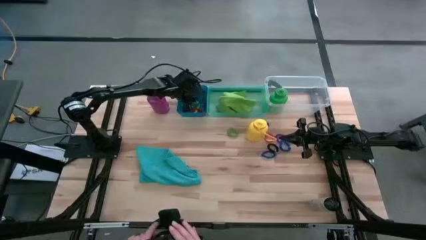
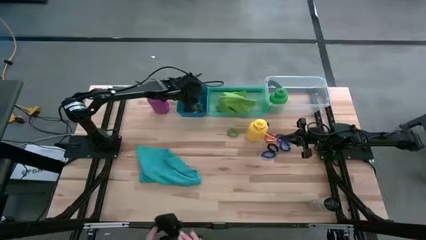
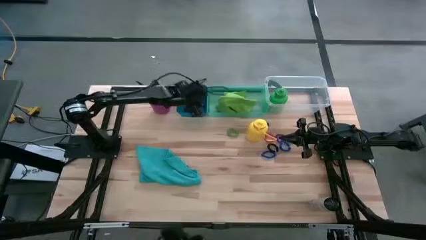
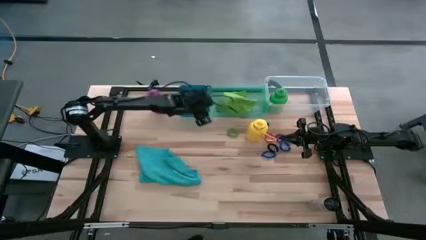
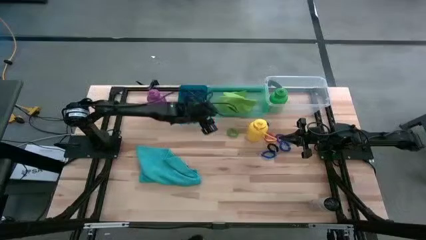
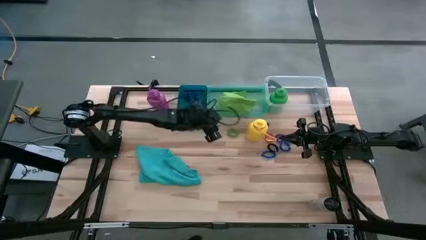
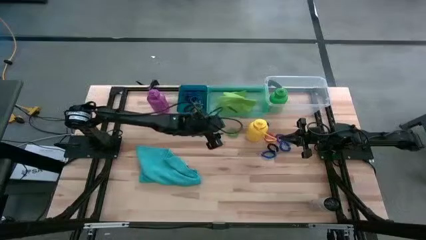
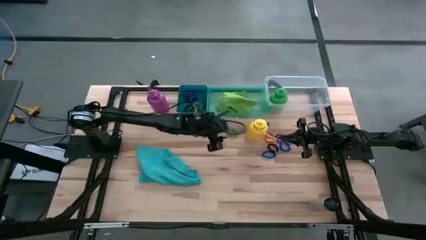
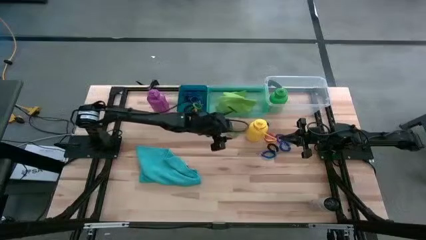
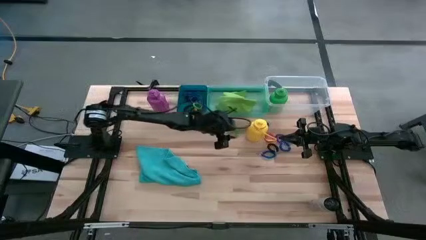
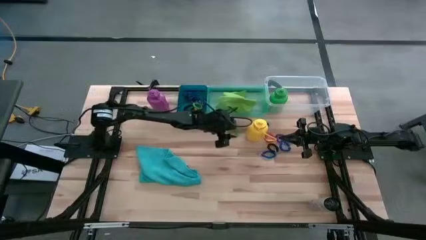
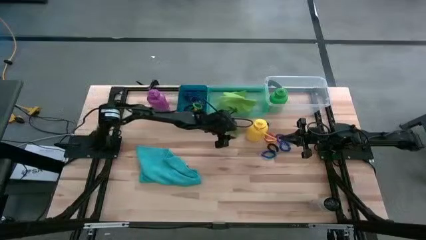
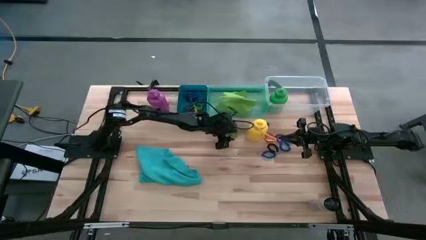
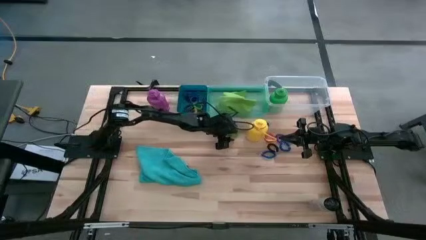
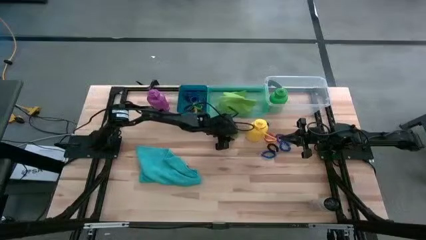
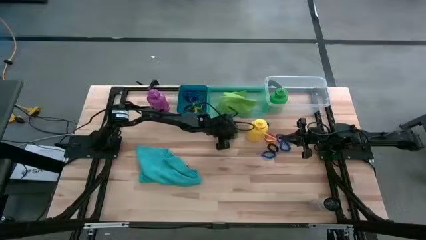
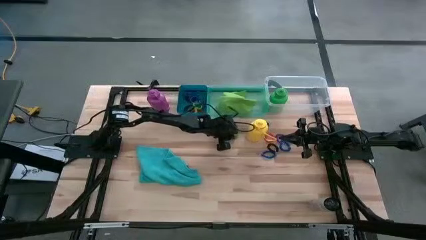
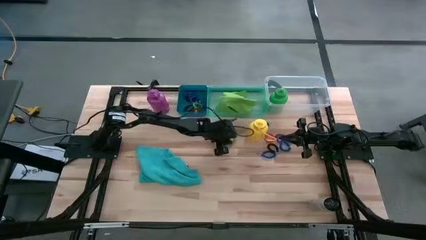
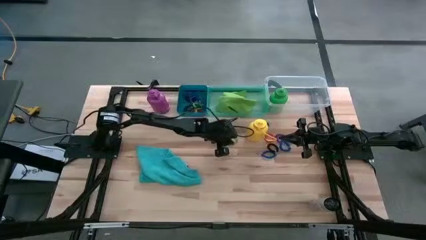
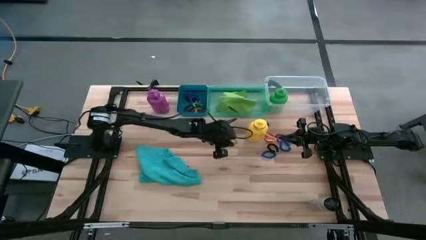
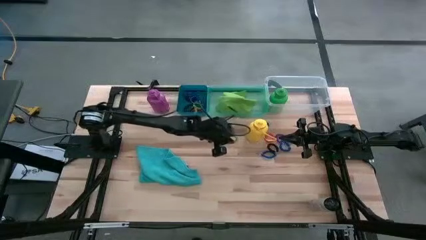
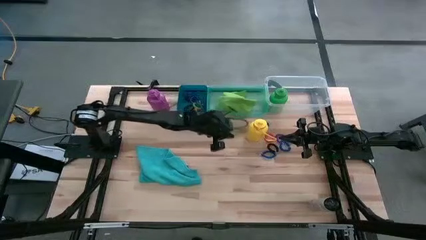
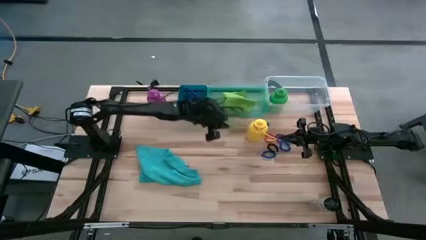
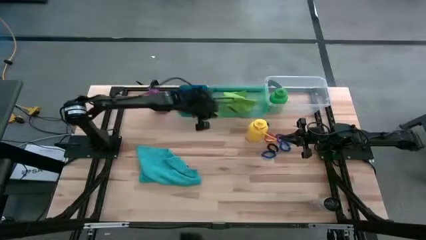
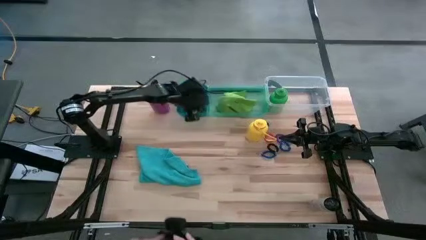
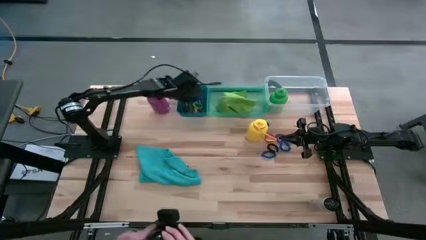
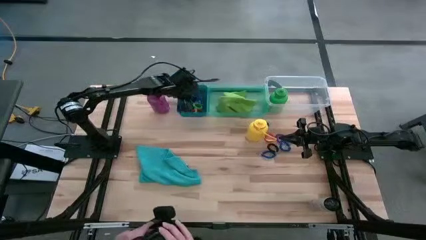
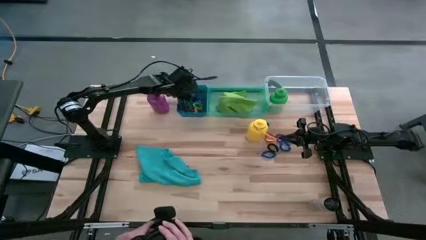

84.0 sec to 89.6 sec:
Task: Pick & Place Sports Items
Put the green spring keychain into the blue bin

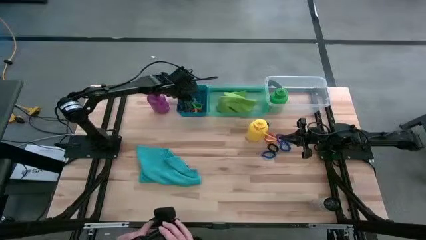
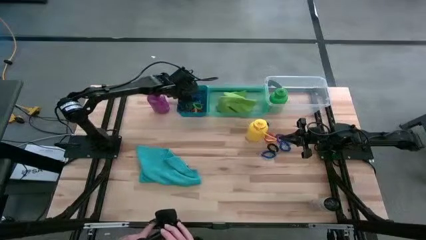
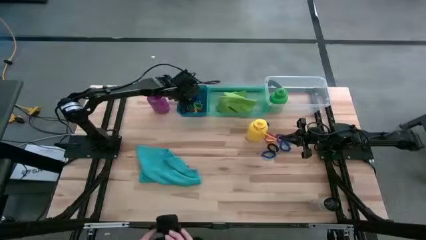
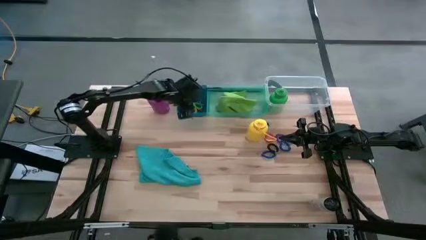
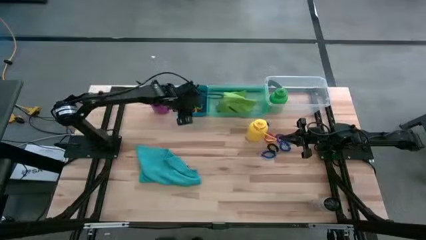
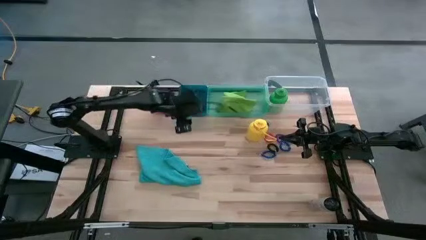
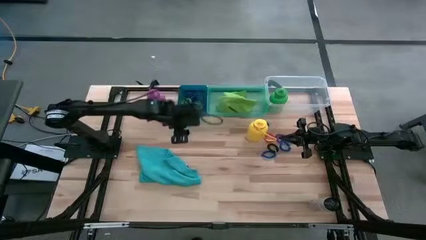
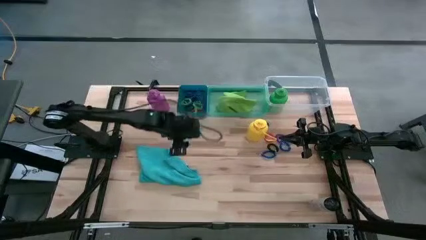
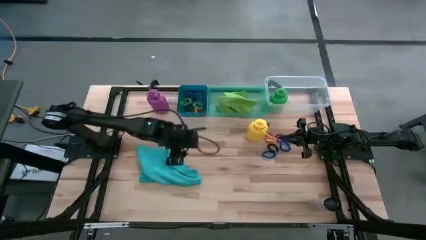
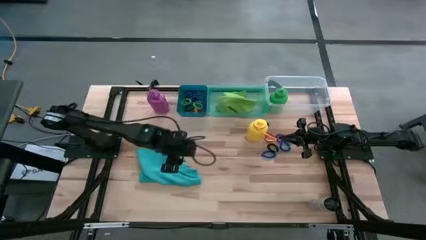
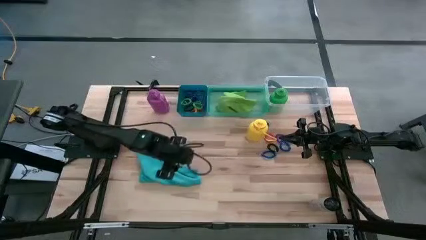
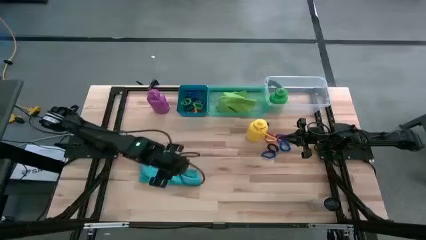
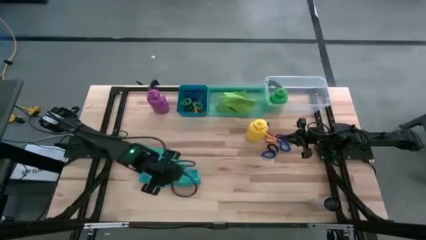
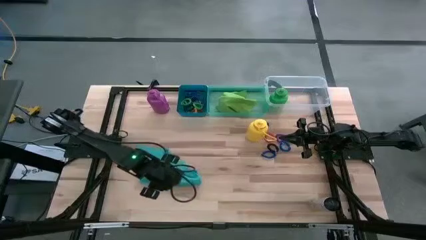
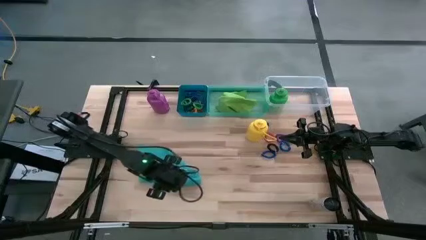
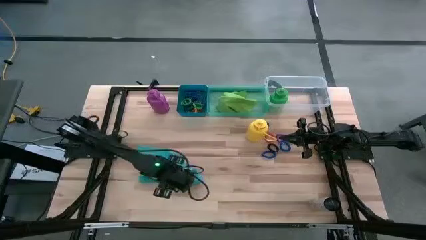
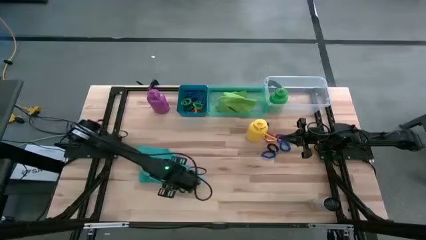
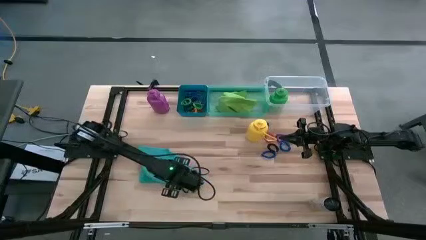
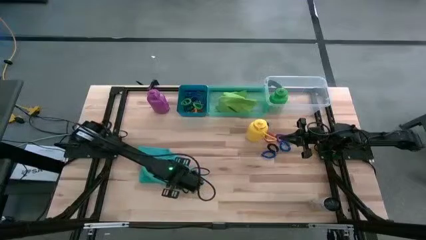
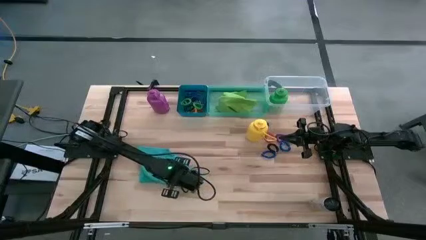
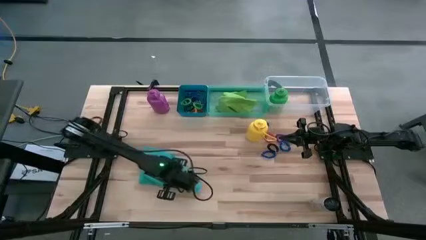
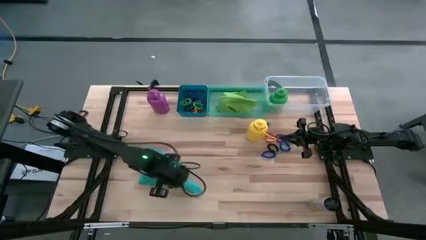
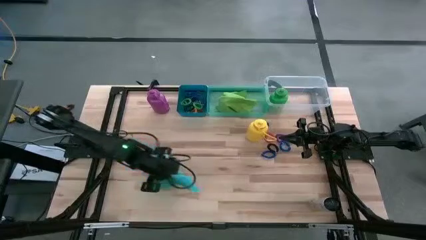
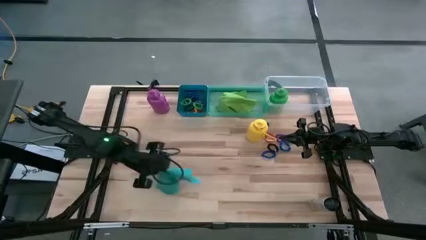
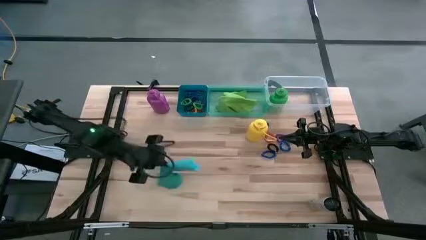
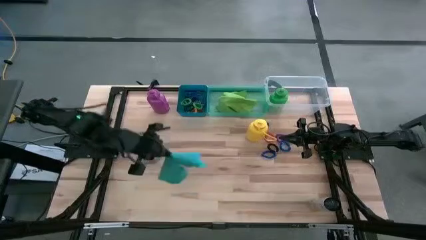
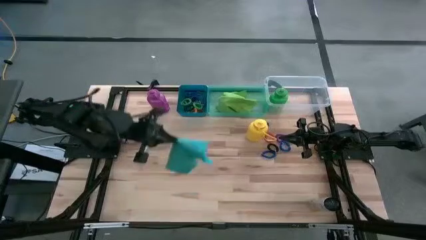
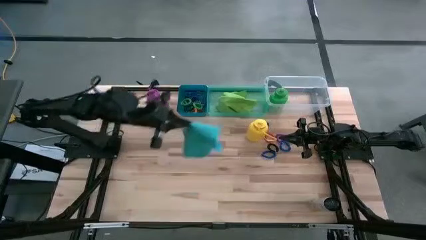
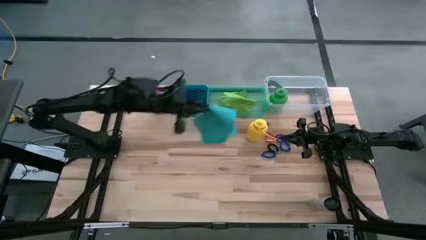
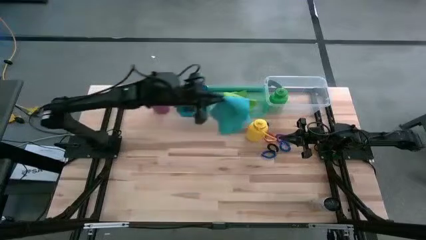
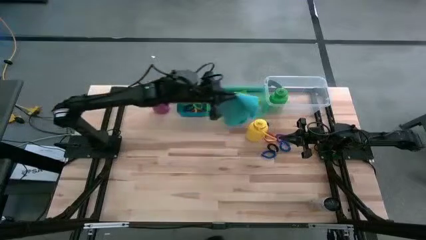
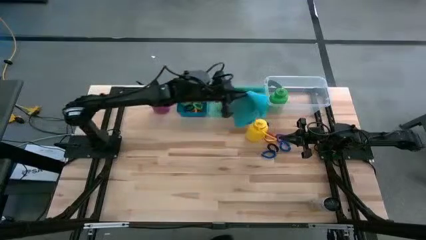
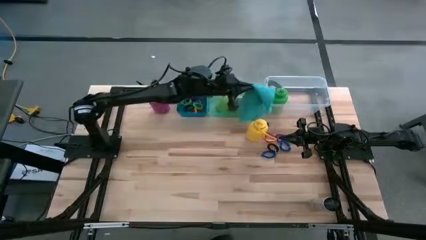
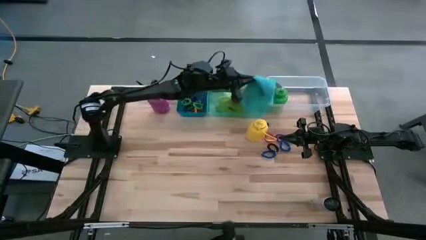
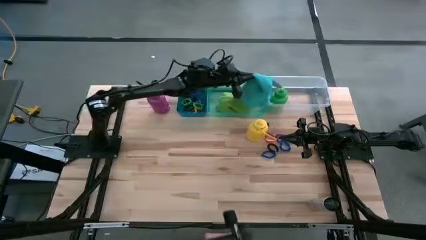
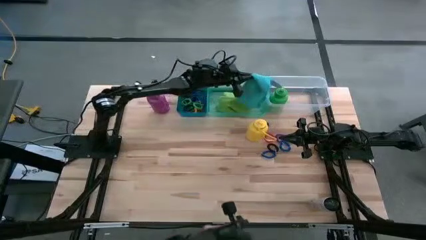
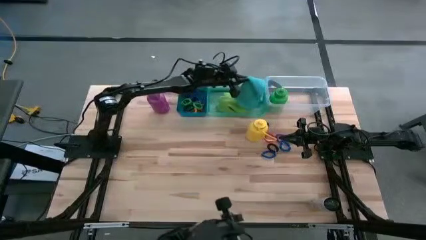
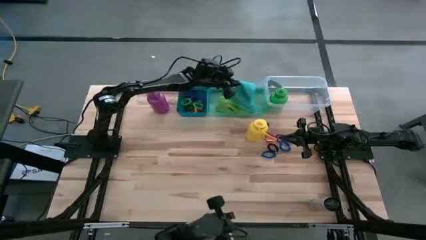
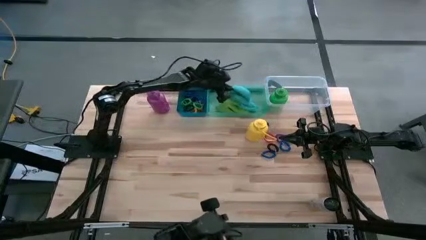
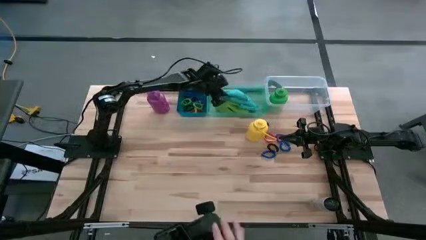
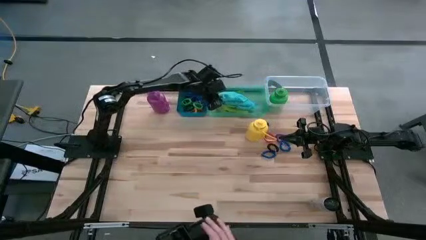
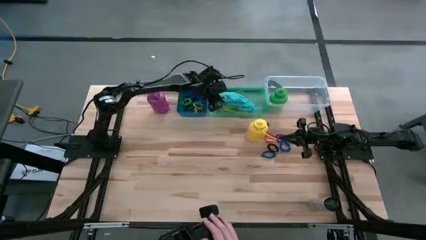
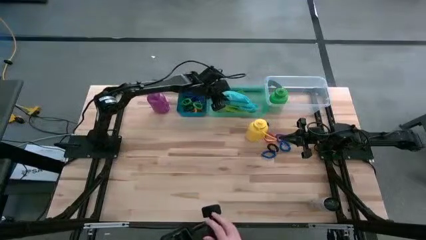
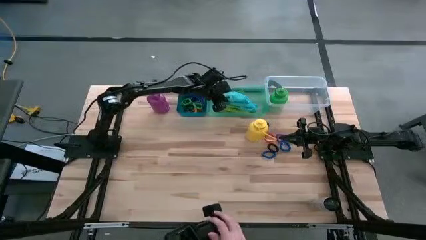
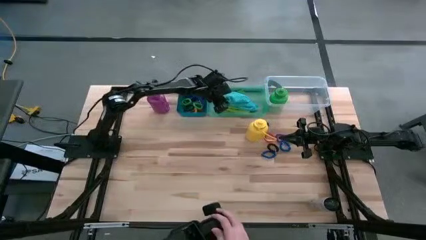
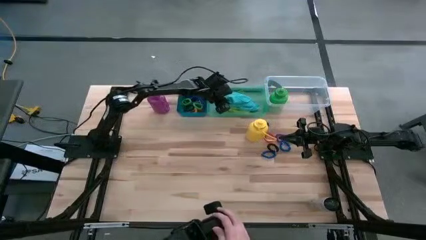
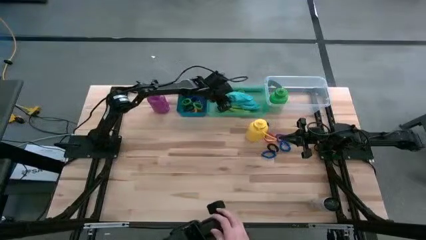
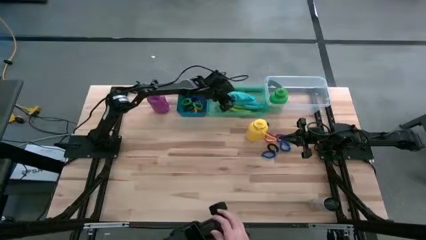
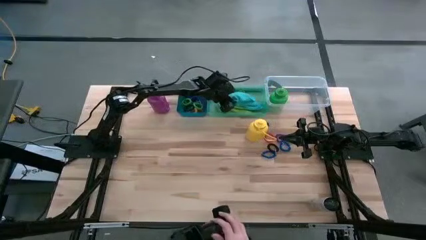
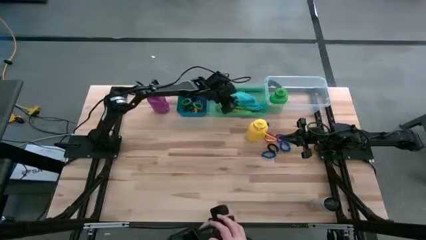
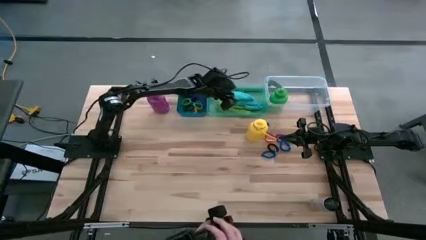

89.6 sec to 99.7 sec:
Put the blue towel into the green bin
